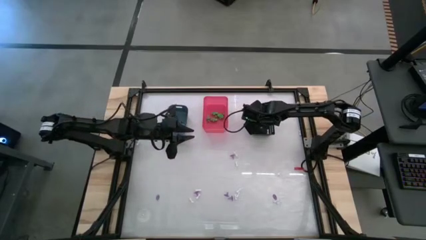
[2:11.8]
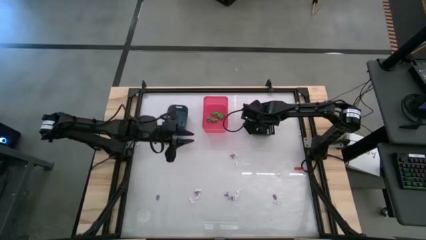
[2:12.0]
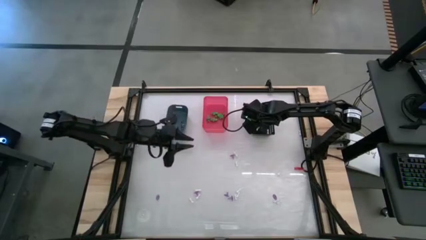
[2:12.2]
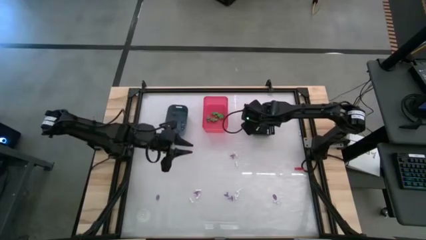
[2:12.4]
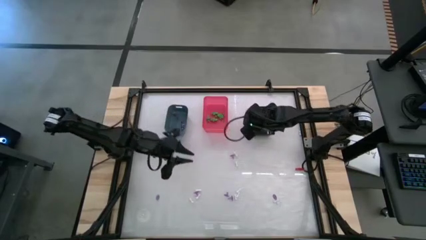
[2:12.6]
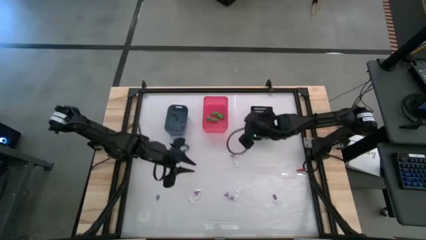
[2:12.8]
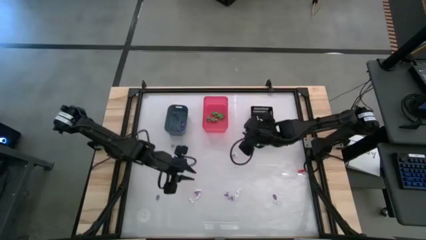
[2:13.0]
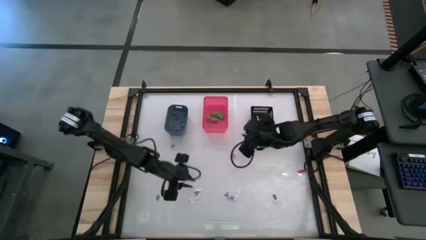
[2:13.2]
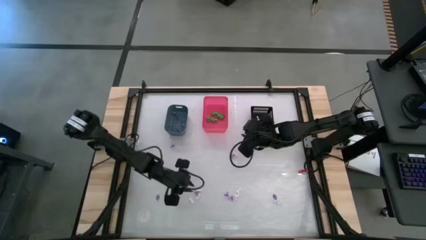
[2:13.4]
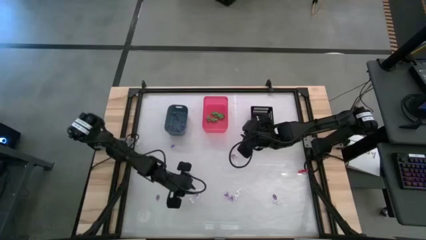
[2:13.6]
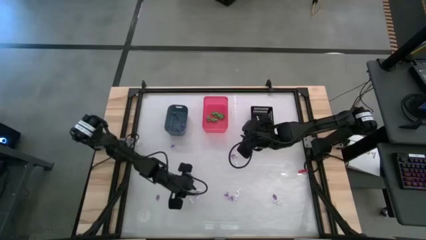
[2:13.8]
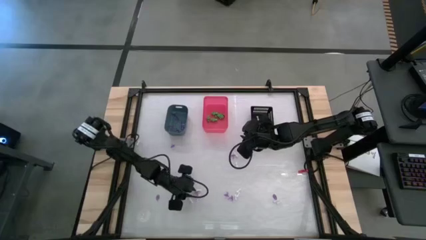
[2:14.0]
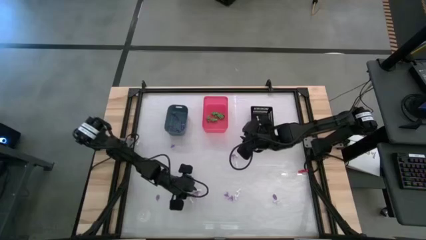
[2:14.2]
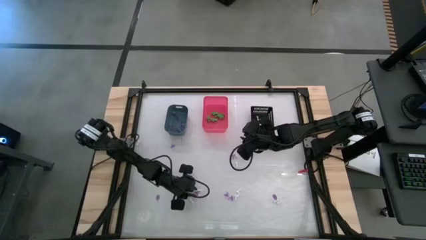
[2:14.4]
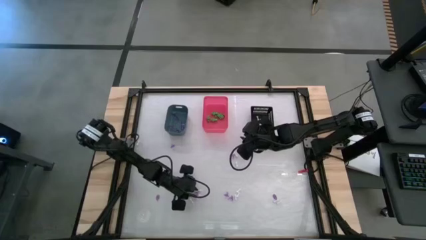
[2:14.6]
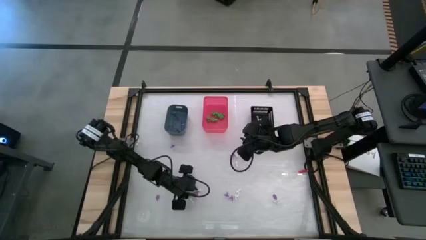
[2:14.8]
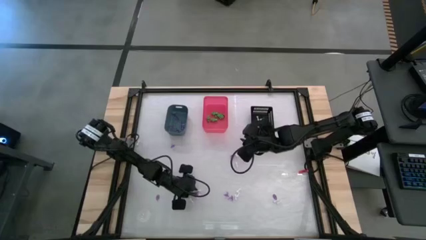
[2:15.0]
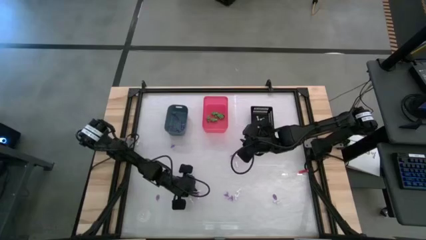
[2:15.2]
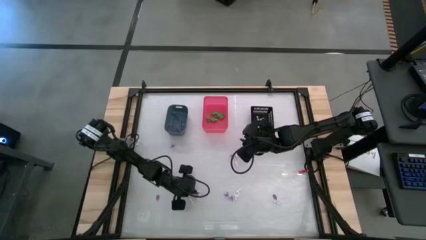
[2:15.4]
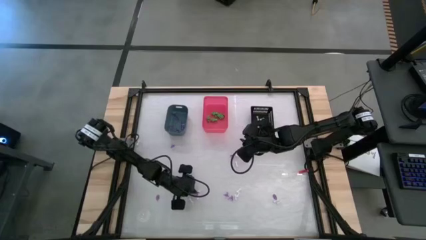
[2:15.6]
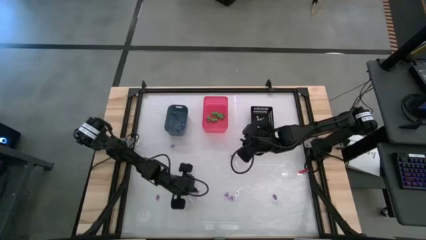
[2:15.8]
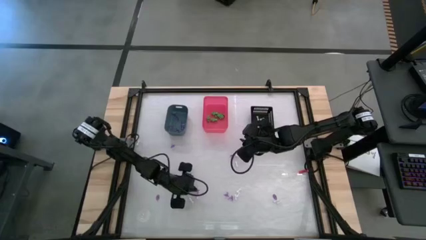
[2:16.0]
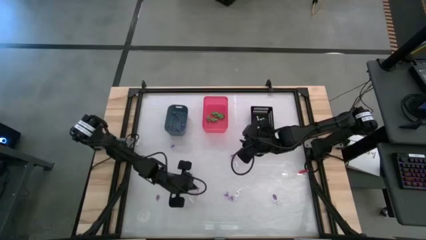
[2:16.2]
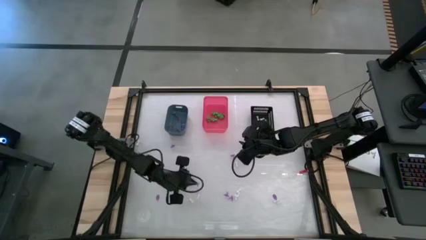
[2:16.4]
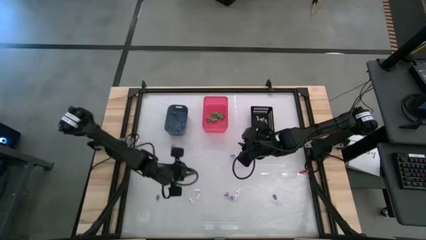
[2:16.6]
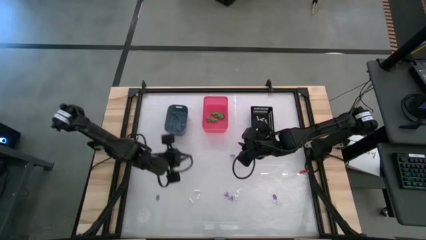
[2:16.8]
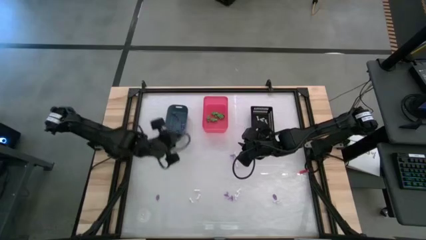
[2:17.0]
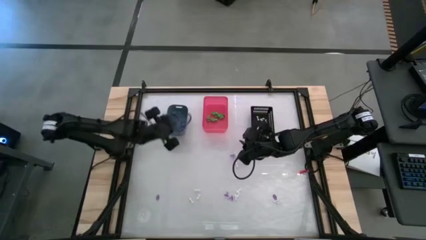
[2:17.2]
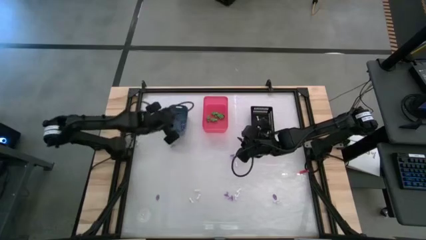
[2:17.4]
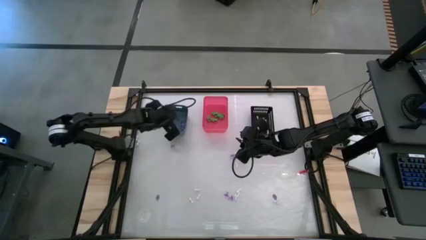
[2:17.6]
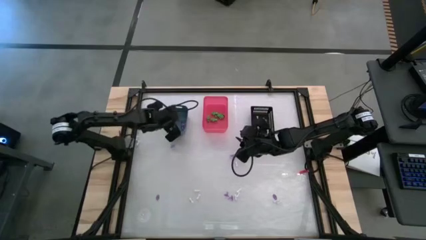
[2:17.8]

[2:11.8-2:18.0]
Task: Sort Halloween decoration
Put the purple witch hat toy into the blue bin

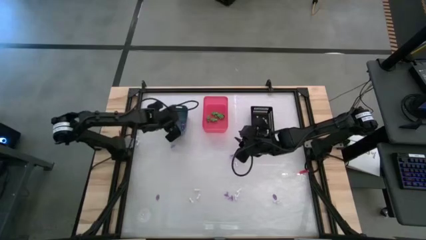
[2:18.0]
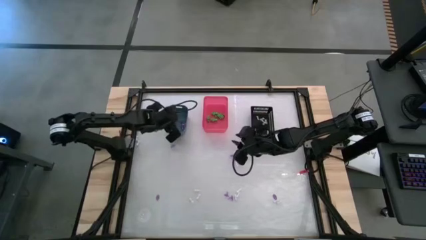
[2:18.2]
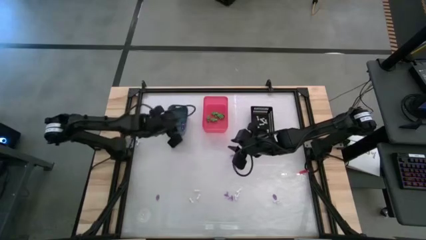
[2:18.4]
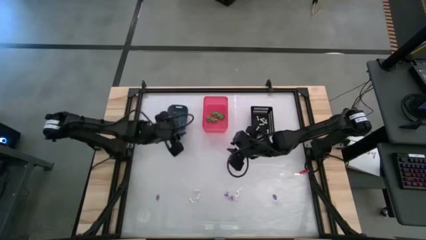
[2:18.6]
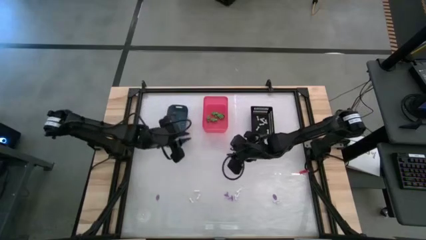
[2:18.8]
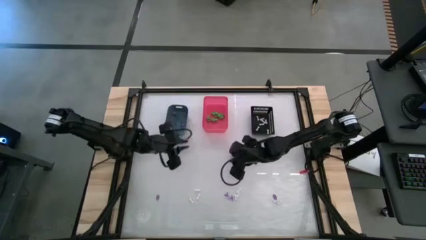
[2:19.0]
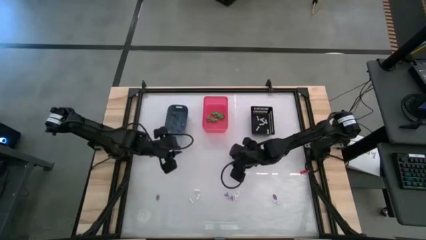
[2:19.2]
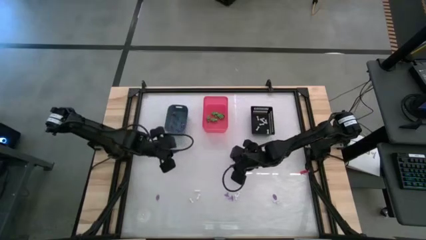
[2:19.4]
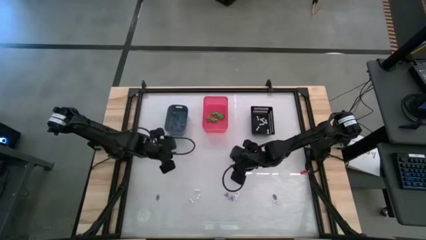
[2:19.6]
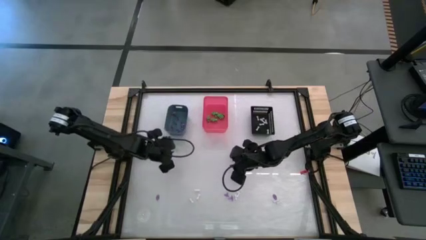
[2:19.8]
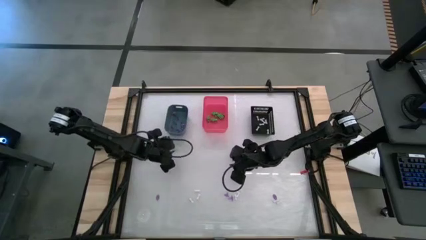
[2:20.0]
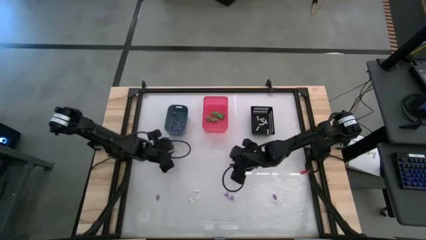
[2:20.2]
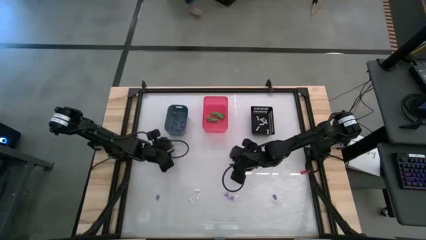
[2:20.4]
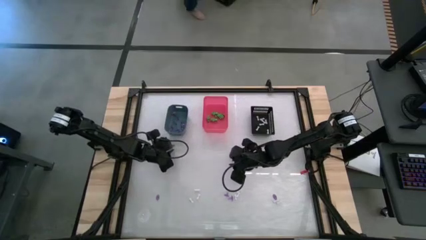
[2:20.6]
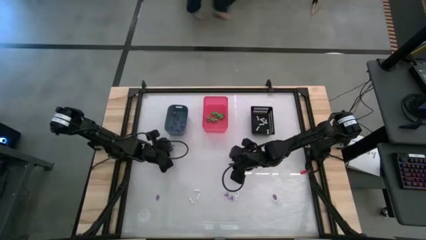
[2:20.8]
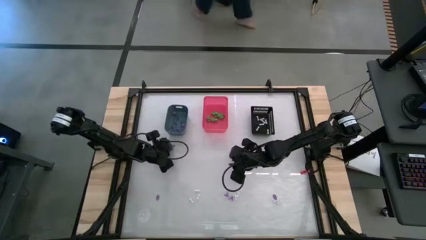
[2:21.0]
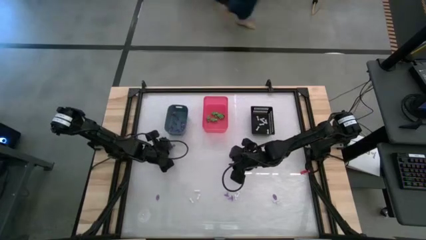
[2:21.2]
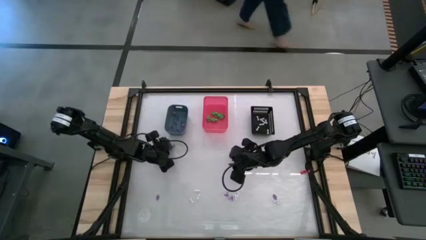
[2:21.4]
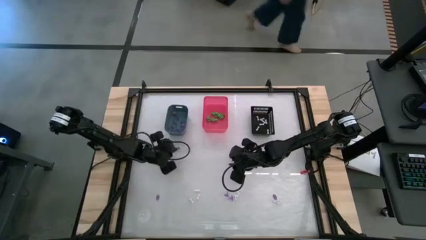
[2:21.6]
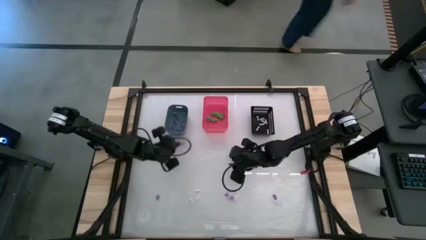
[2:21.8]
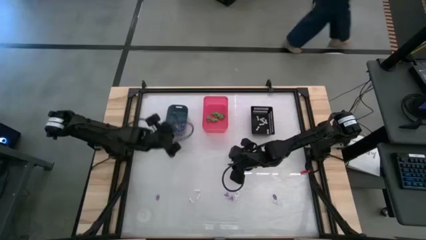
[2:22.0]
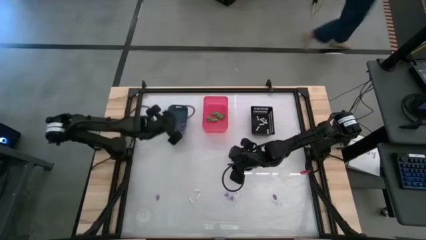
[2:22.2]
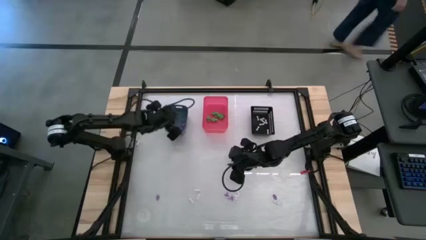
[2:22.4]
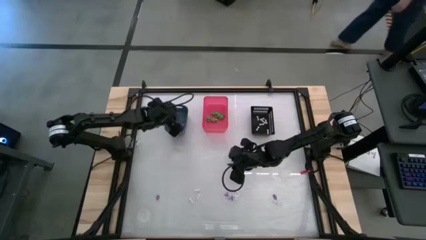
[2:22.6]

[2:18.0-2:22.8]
Put the purple witch hat toy into the blue bin

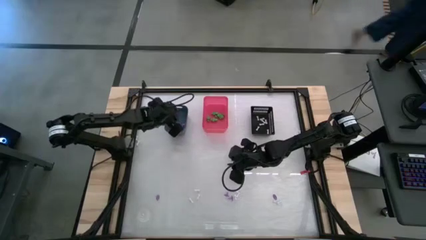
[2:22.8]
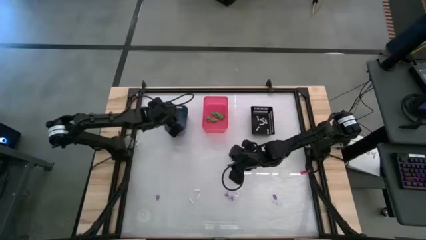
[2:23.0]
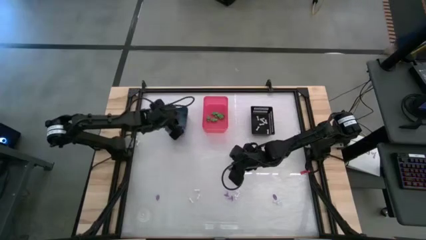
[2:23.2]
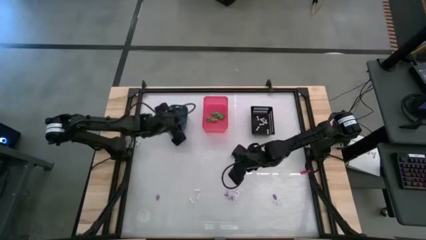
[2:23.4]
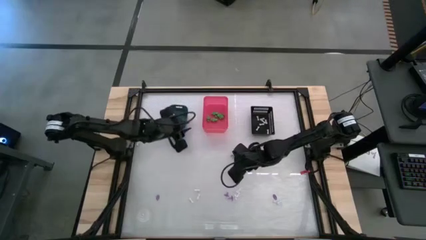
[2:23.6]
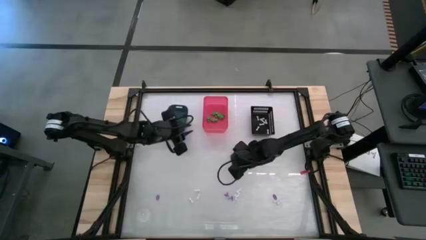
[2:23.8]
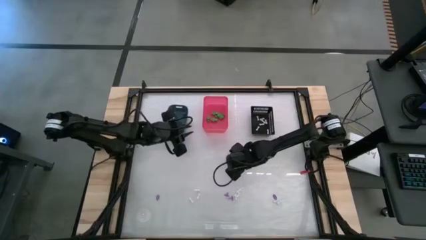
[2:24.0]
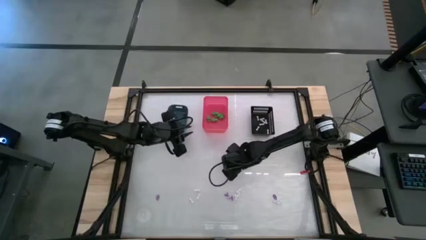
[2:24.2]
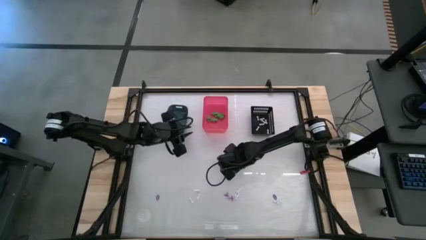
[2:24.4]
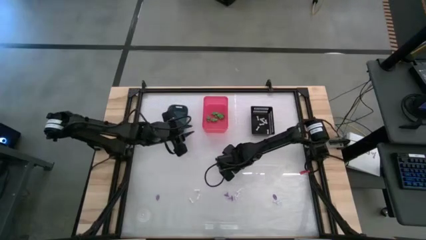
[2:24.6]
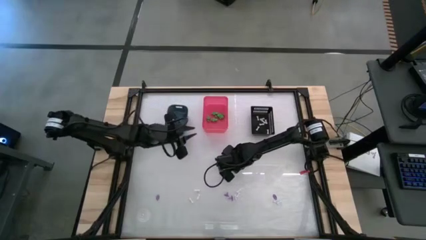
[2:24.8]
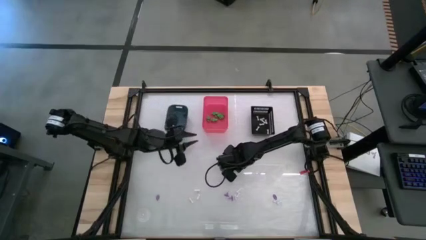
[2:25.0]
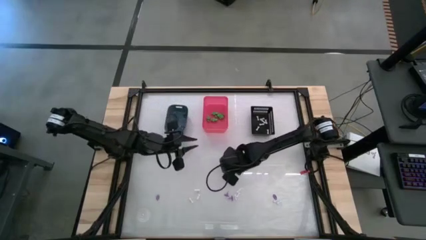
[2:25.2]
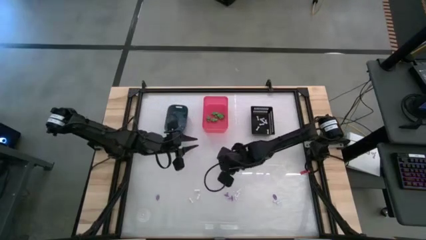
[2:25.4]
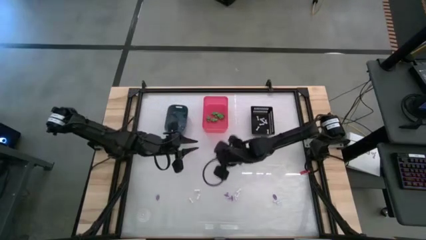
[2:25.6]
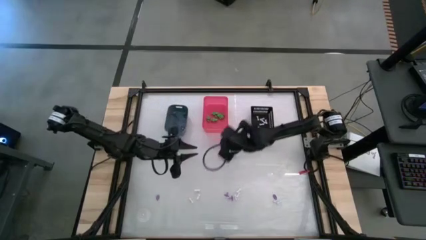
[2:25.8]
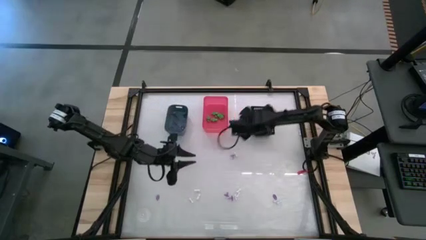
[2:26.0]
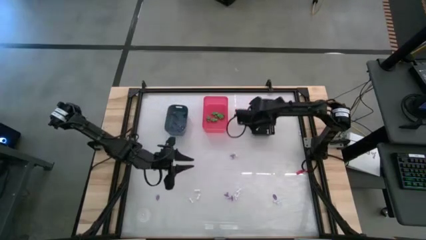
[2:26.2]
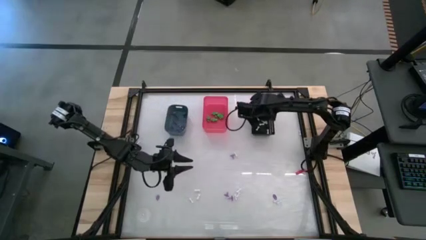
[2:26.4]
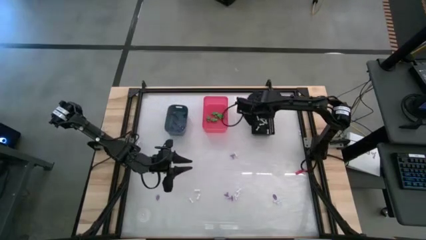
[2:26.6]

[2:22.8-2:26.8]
Put the white bone toy into the black bin

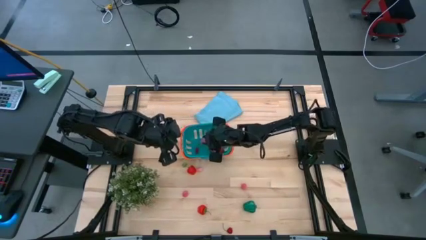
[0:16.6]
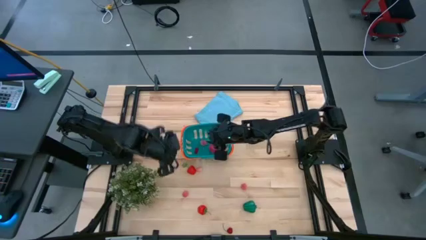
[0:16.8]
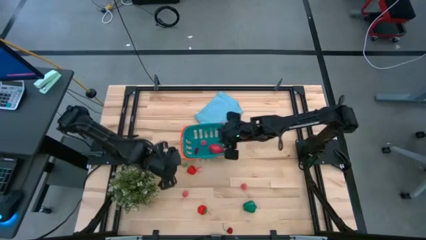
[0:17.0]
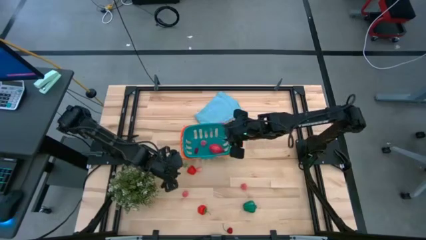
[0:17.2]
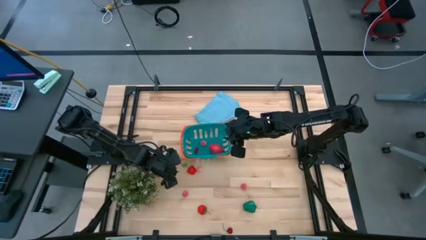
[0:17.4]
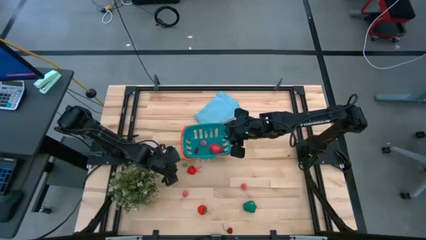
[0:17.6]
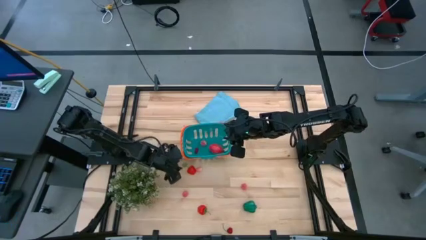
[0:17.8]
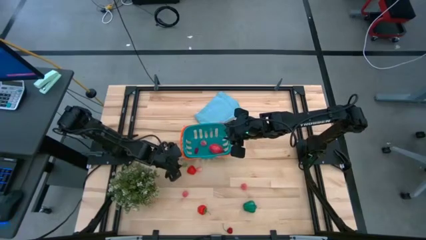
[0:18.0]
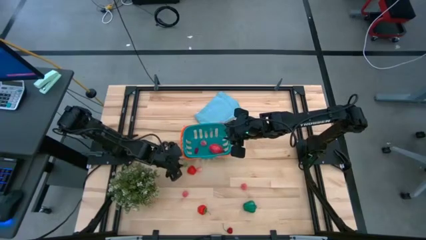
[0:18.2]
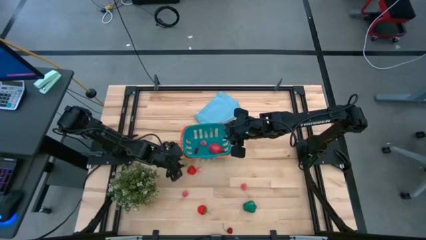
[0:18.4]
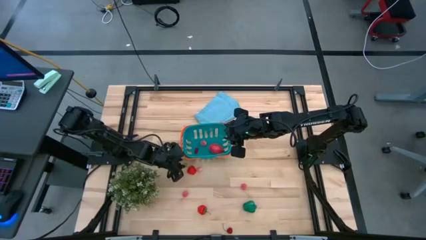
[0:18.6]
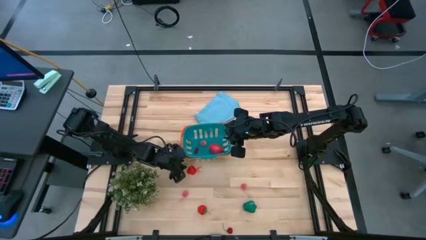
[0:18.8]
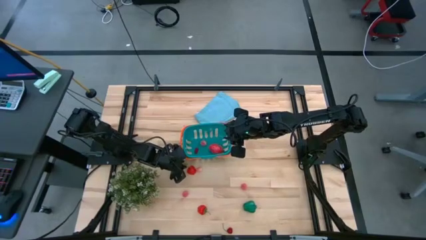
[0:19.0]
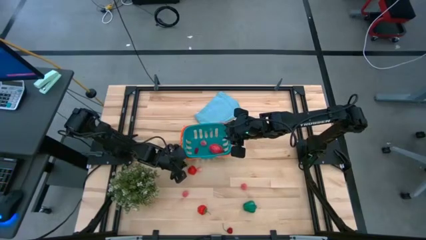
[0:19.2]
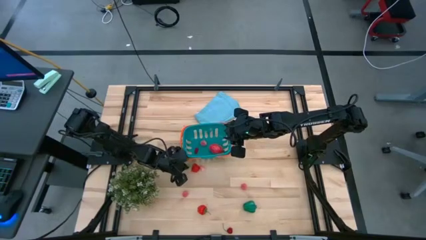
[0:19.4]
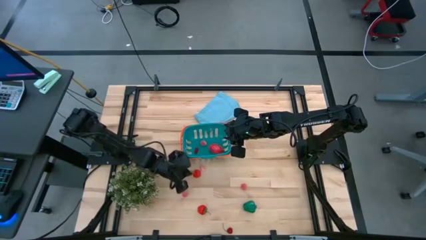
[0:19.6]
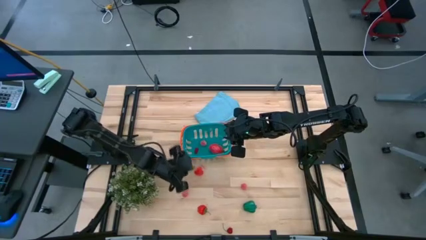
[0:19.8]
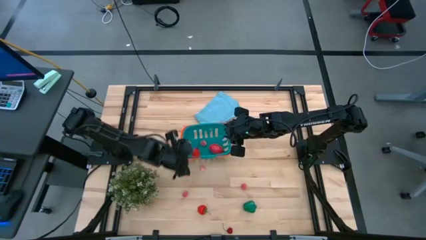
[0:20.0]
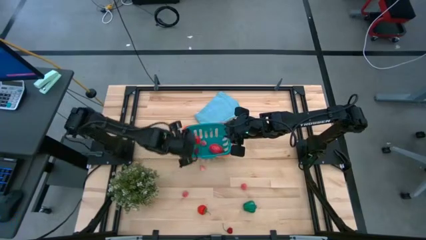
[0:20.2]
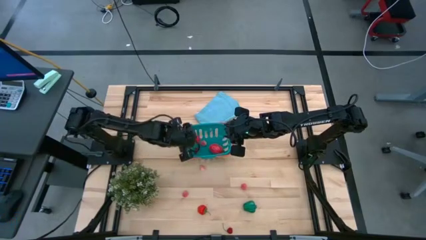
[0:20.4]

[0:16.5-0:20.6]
Task: Pick and placing Produce into tupperware
Put the red strawberry into the bin
